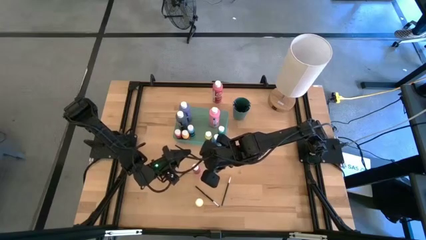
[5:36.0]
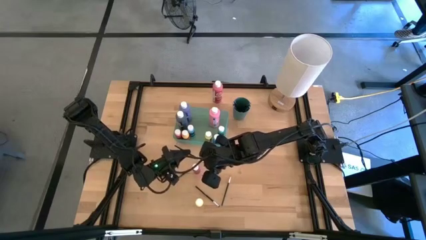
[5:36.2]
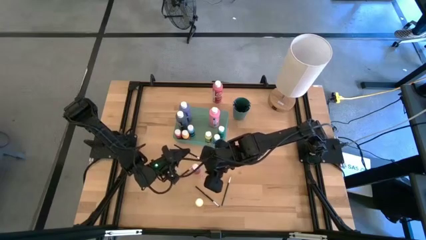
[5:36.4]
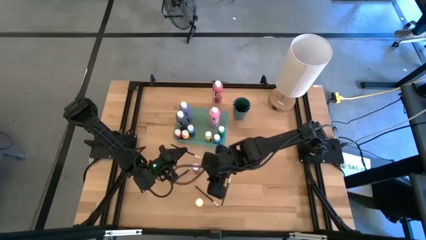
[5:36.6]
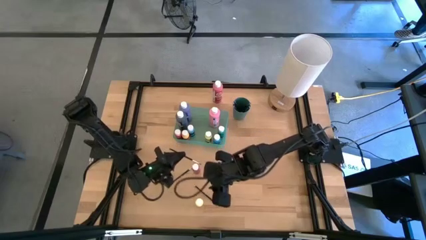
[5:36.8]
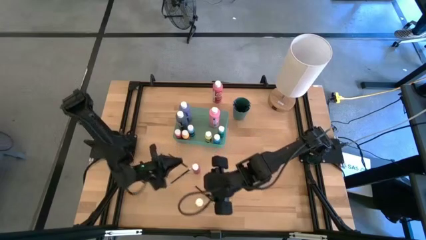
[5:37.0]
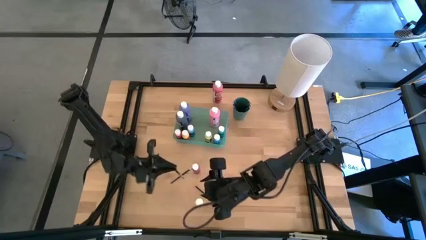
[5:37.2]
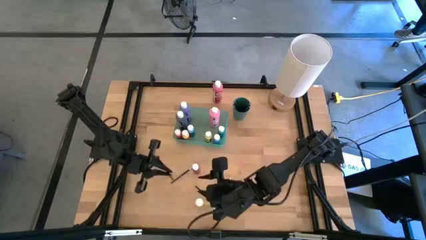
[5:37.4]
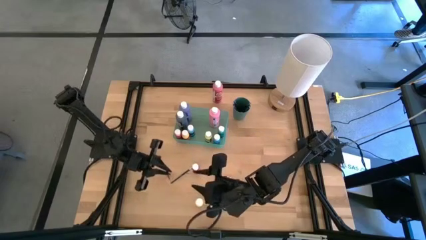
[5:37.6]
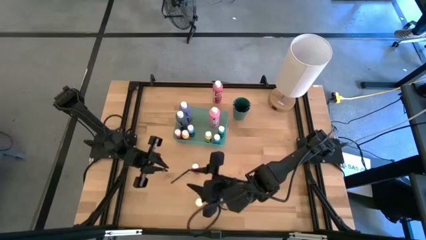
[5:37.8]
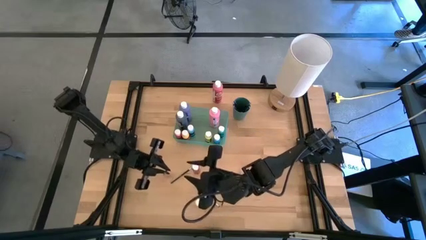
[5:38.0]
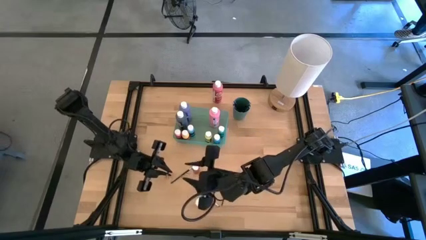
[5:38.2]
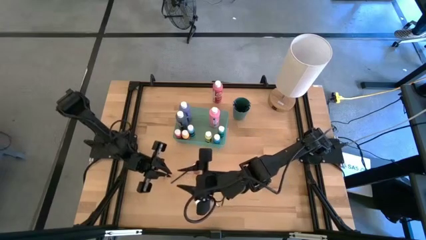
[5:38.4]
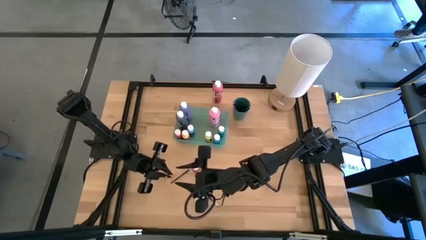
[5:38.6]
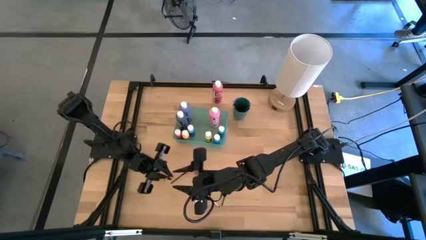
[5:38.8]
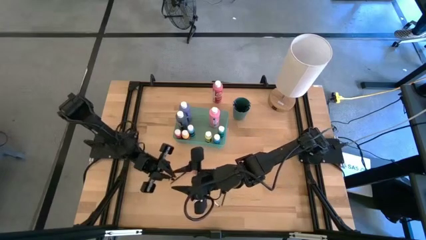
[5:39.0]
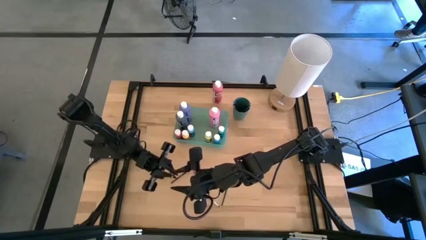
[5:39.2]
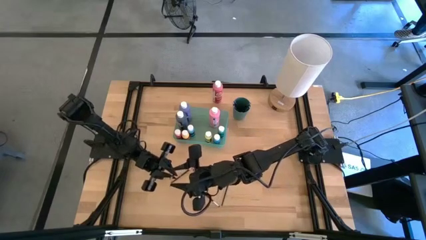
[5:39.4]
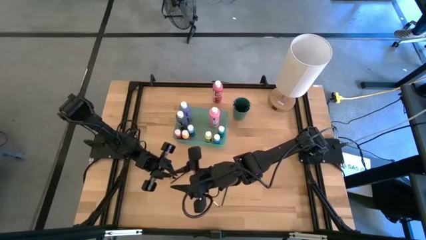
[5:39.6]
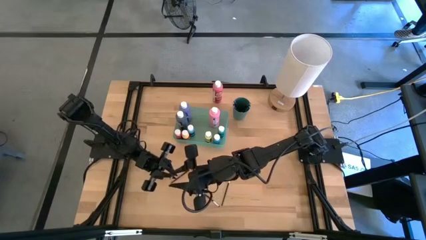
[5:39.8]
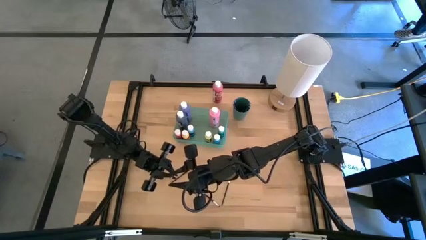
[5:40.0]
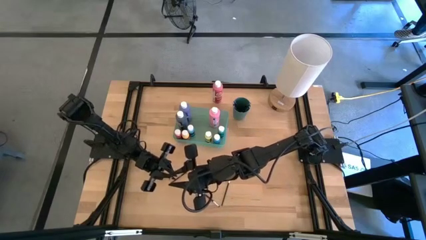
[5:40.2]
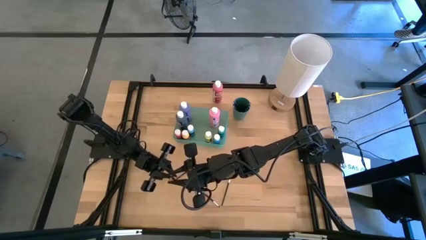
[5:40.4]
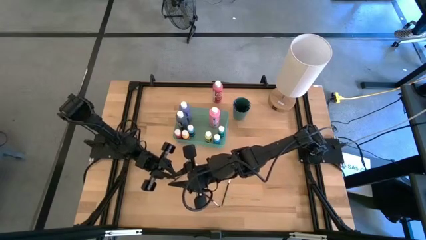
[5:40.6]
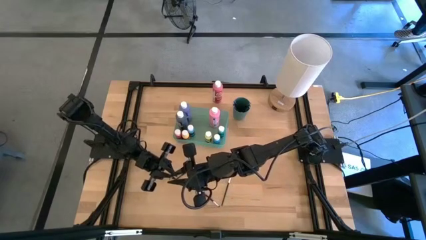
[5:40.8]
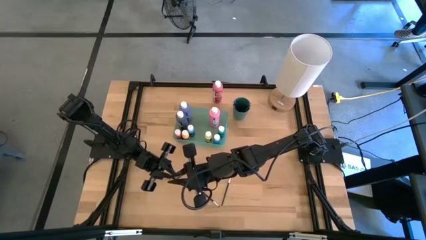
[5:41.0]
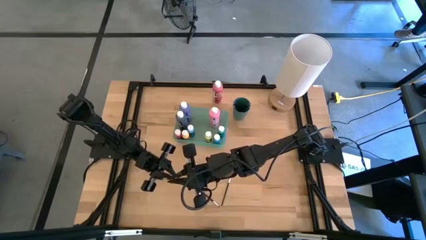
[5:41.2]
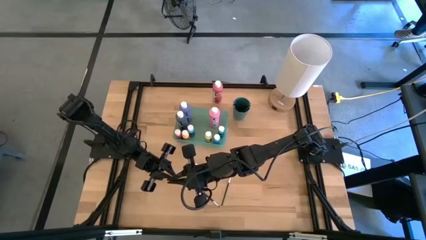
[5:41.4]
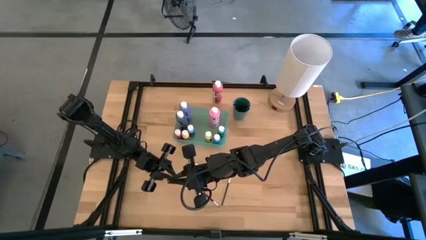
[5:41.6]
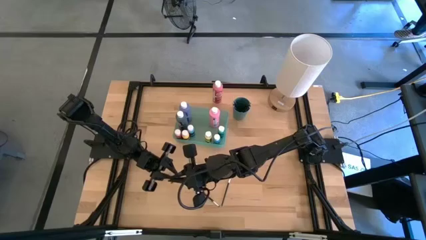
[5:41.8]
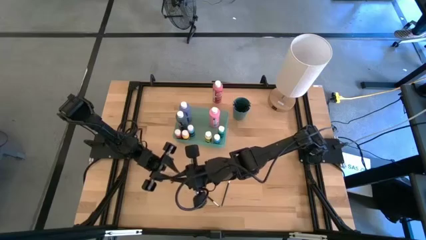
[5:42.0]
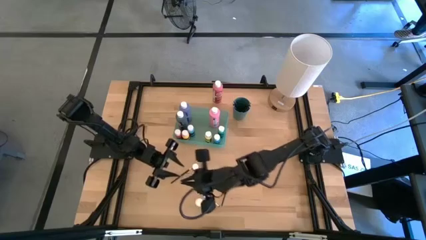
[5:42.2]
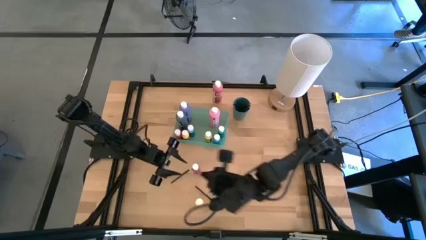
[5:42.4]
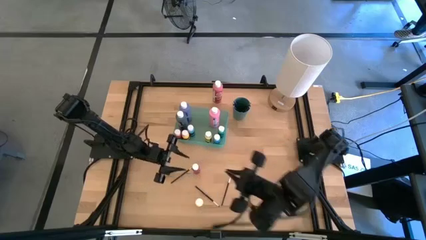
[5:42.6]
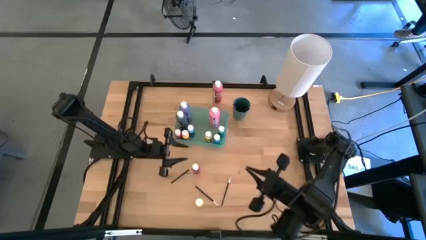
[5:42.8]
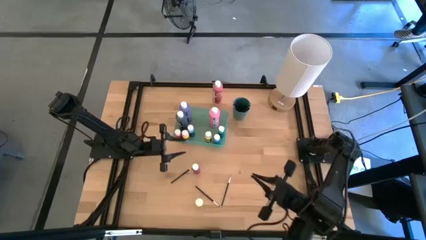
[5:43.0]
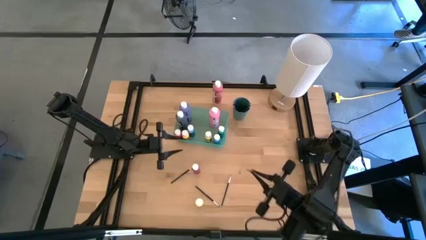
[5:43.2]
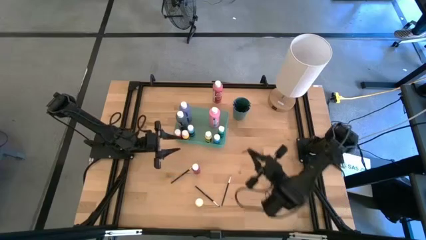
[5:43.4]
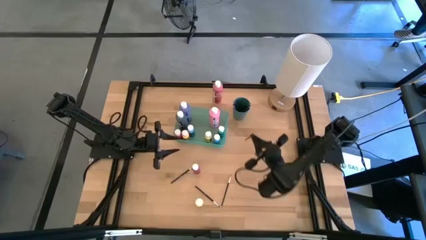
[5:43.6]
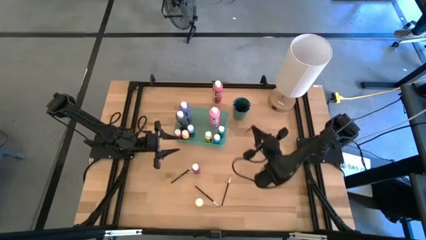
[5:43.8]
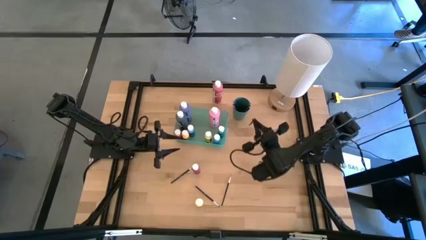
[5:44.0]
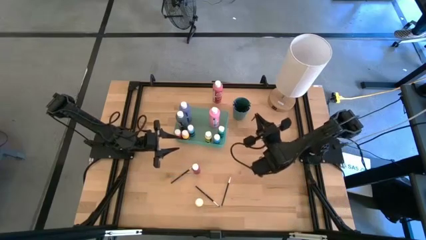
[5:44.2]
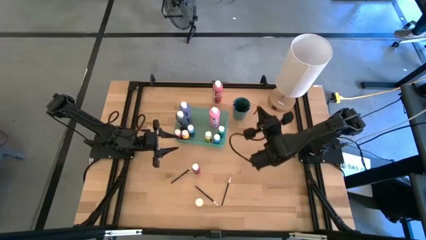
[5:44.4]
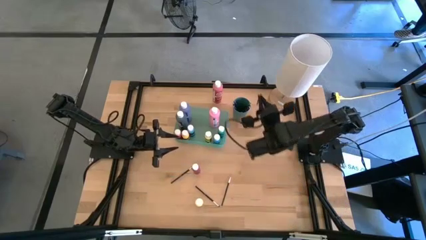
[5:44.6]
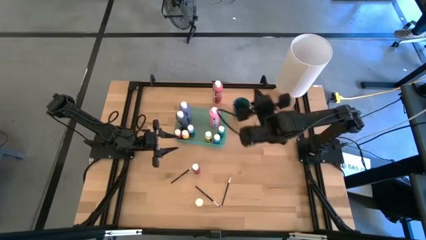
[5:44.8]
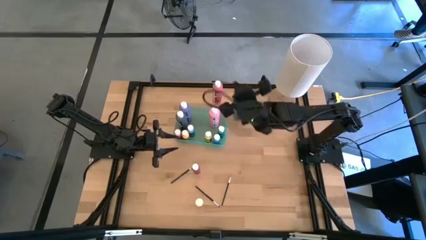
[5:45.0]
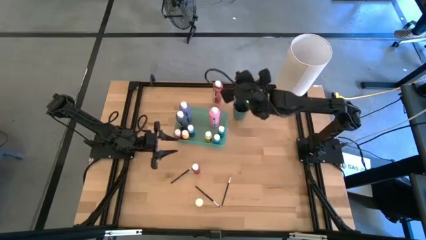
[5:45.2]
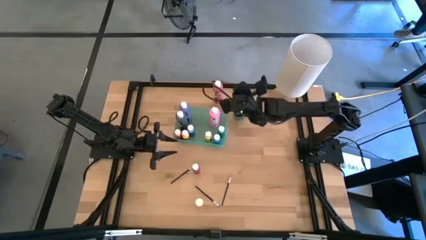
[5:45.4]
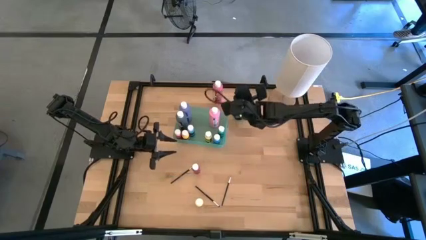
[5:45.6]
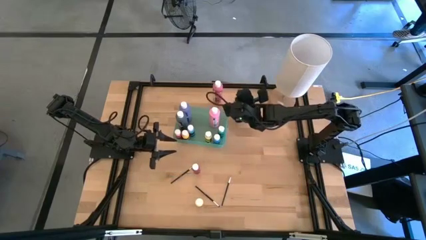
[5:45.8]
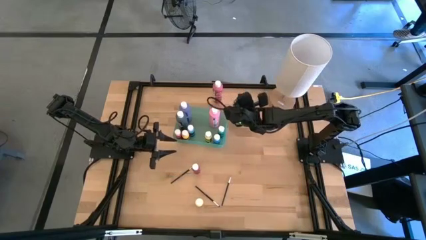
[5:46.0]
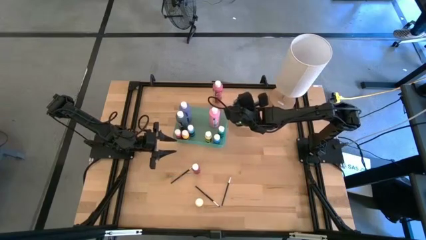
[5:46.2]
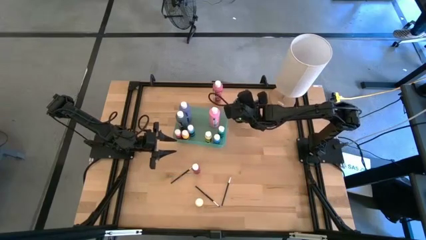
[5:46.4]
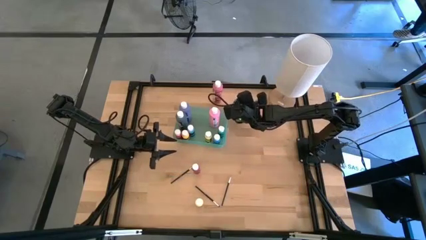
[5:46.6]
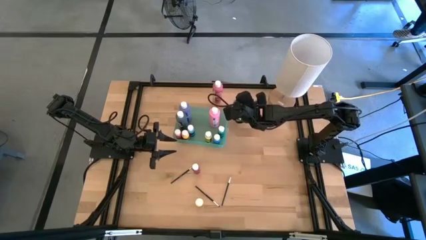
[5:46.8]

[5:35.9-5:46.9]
Task: Pick & Place Paint Supplies
Put the black paint brush into the dark green cup
